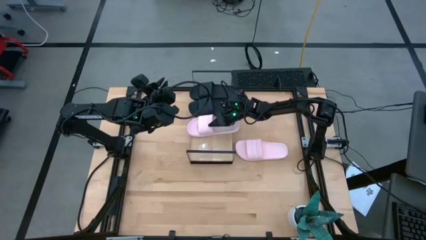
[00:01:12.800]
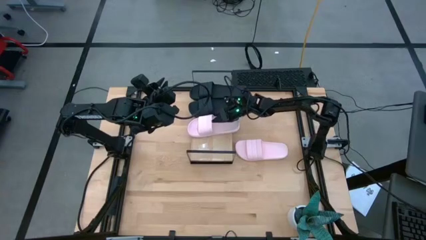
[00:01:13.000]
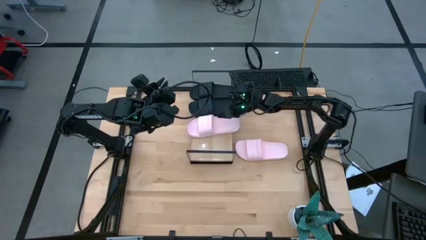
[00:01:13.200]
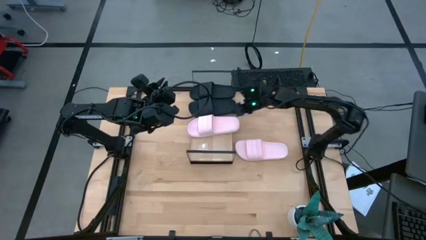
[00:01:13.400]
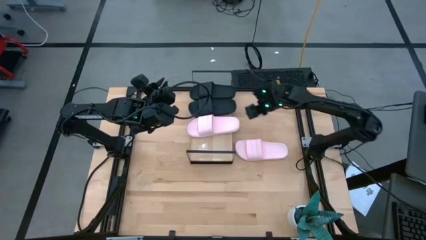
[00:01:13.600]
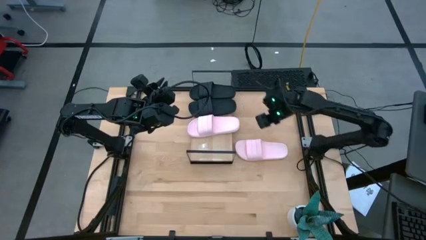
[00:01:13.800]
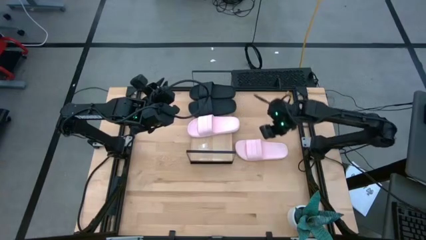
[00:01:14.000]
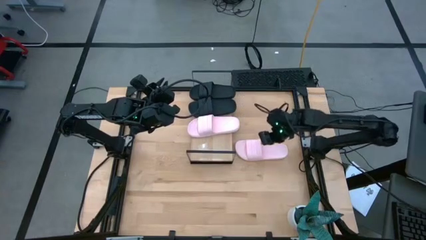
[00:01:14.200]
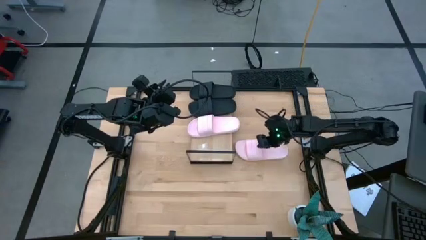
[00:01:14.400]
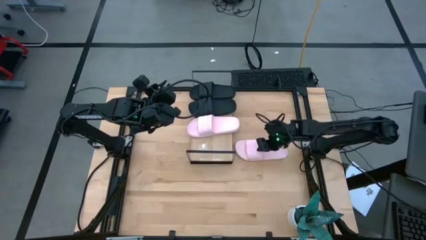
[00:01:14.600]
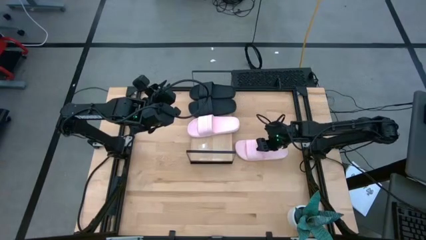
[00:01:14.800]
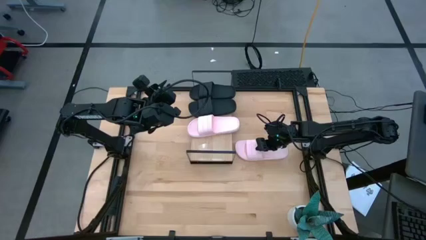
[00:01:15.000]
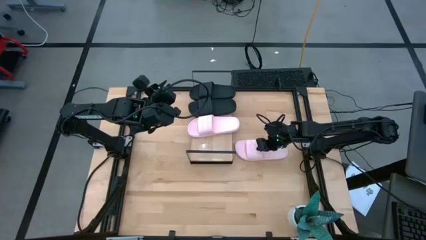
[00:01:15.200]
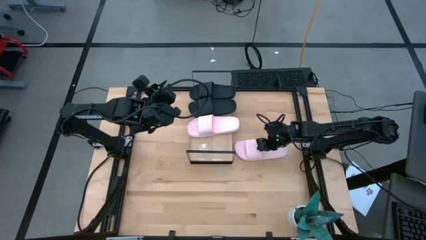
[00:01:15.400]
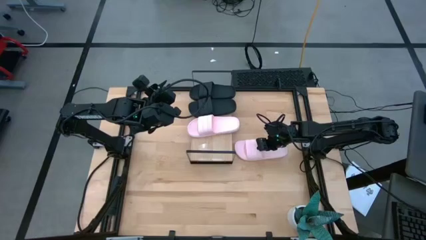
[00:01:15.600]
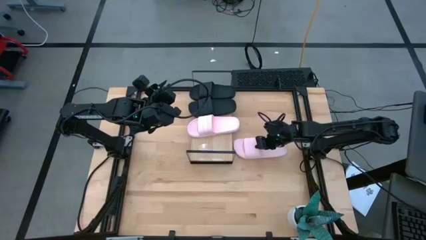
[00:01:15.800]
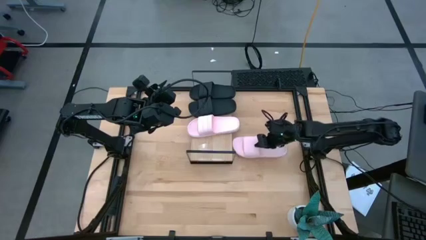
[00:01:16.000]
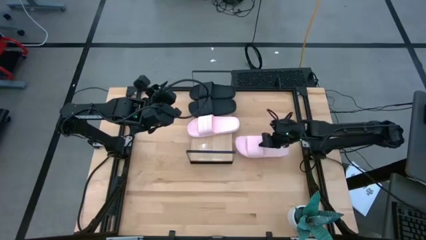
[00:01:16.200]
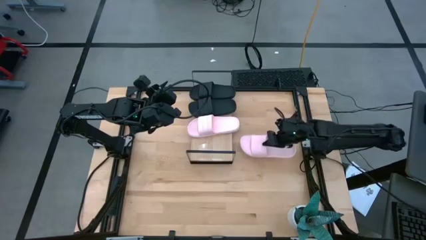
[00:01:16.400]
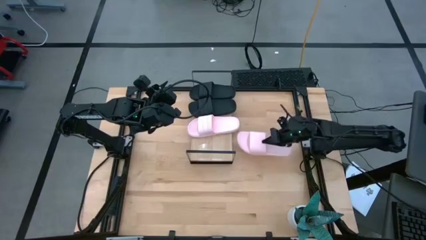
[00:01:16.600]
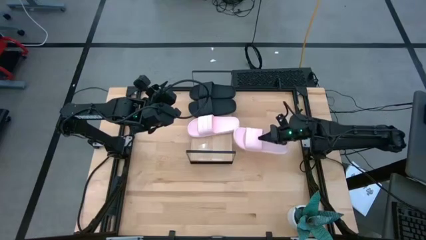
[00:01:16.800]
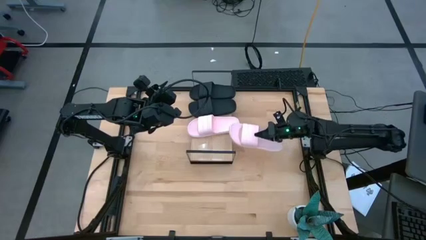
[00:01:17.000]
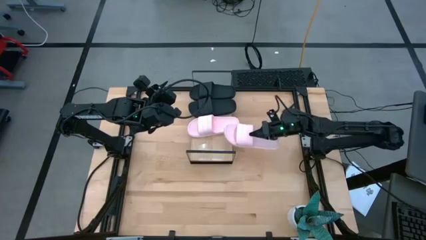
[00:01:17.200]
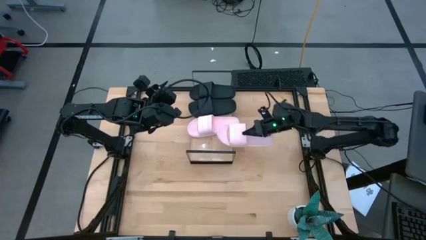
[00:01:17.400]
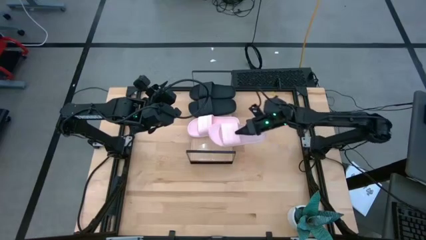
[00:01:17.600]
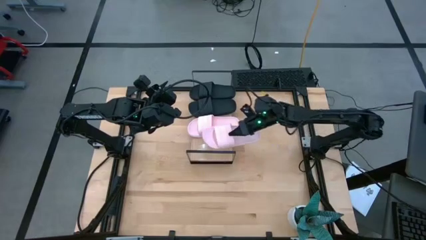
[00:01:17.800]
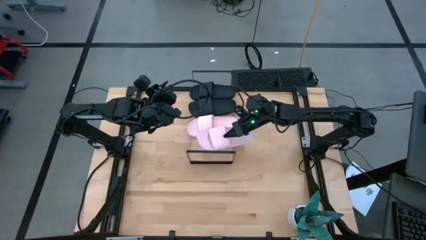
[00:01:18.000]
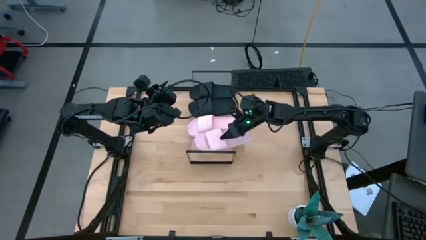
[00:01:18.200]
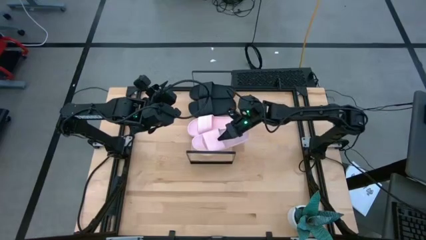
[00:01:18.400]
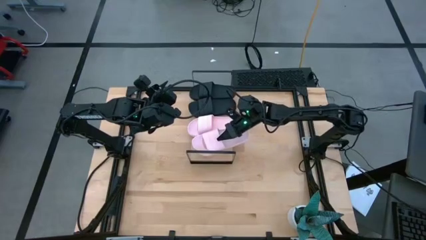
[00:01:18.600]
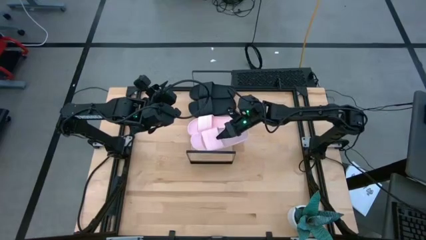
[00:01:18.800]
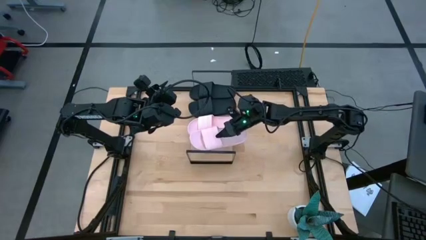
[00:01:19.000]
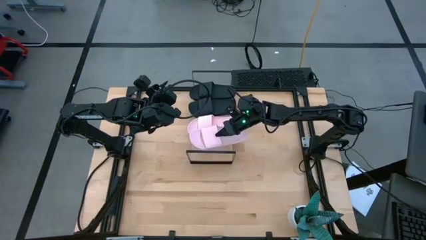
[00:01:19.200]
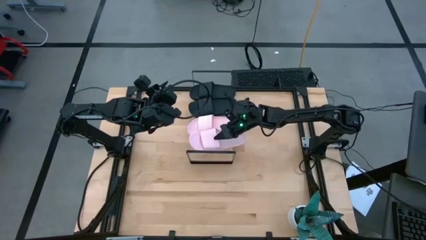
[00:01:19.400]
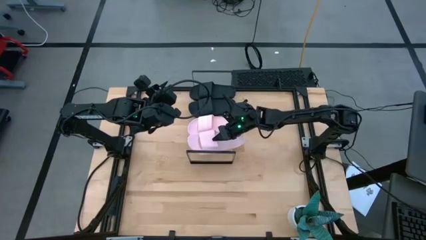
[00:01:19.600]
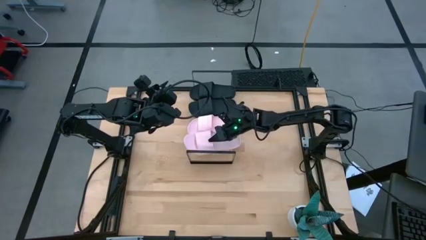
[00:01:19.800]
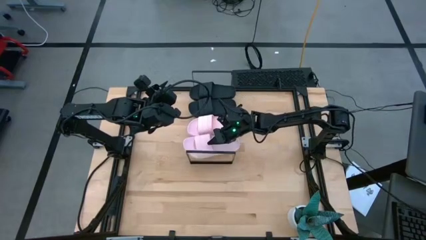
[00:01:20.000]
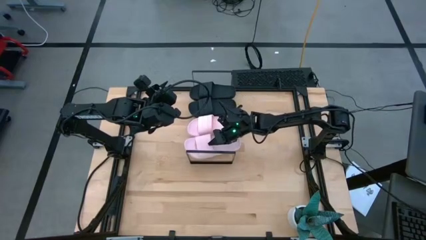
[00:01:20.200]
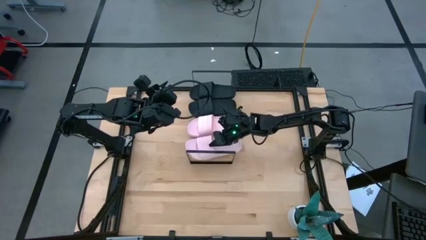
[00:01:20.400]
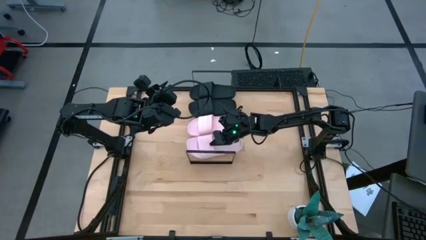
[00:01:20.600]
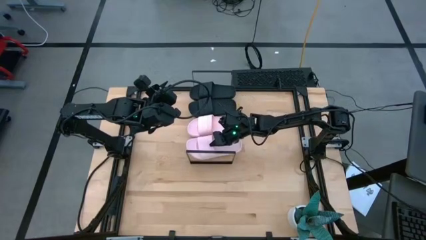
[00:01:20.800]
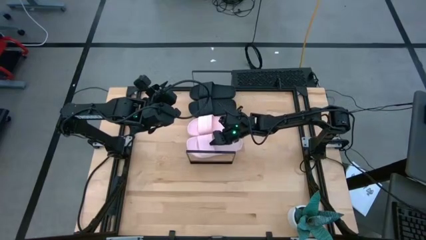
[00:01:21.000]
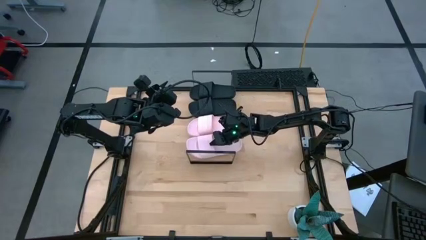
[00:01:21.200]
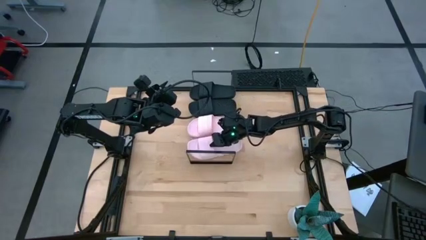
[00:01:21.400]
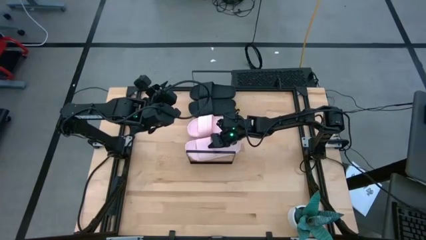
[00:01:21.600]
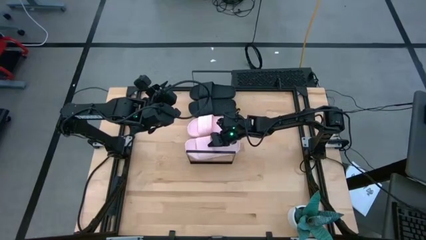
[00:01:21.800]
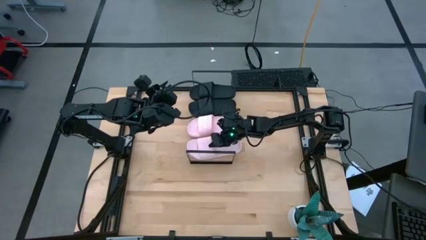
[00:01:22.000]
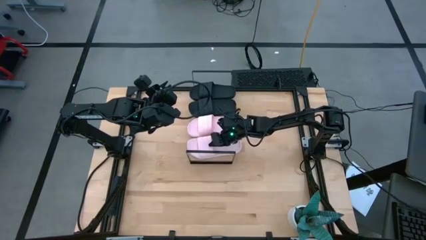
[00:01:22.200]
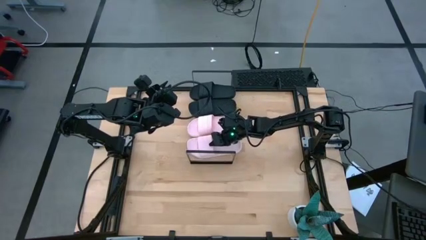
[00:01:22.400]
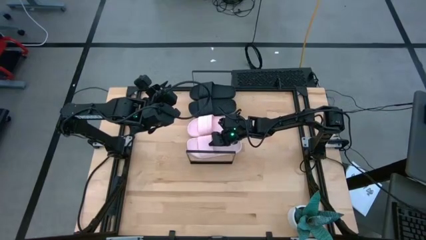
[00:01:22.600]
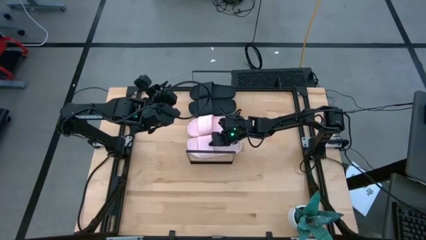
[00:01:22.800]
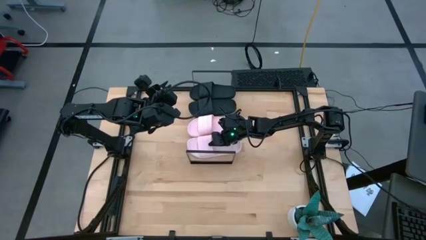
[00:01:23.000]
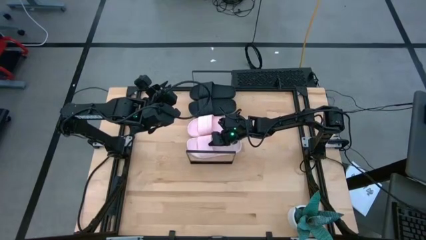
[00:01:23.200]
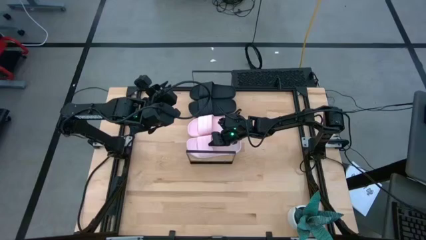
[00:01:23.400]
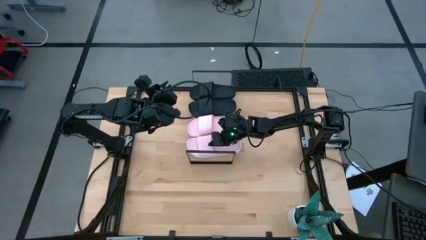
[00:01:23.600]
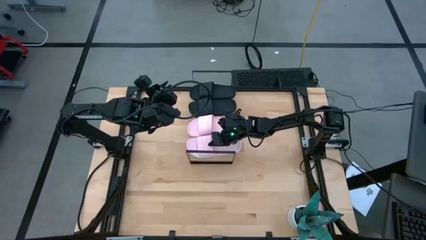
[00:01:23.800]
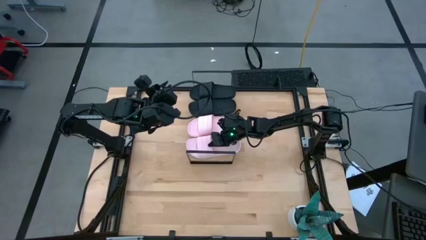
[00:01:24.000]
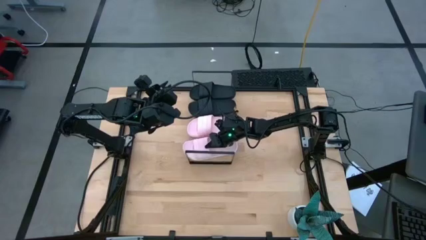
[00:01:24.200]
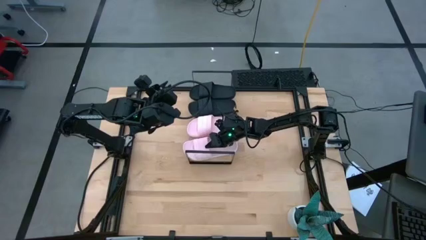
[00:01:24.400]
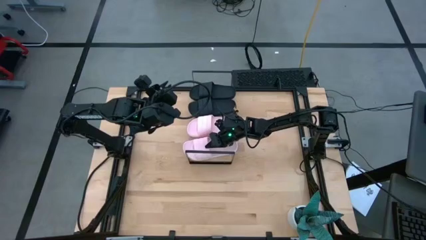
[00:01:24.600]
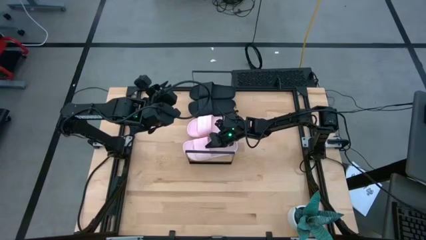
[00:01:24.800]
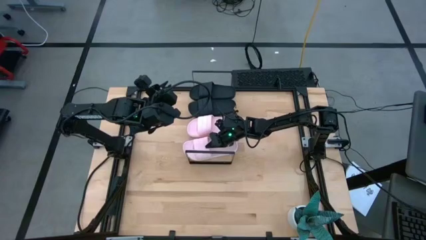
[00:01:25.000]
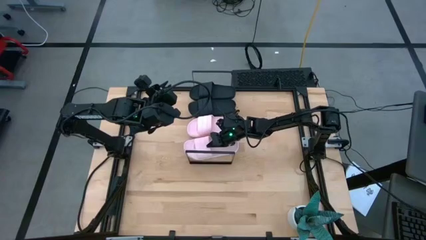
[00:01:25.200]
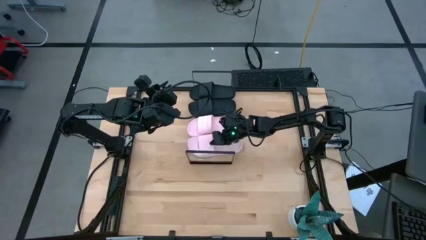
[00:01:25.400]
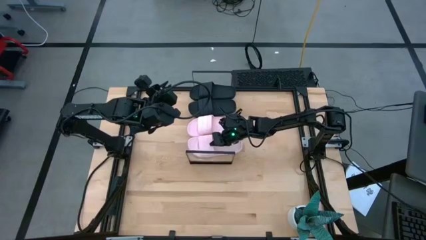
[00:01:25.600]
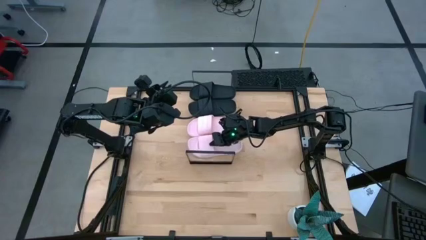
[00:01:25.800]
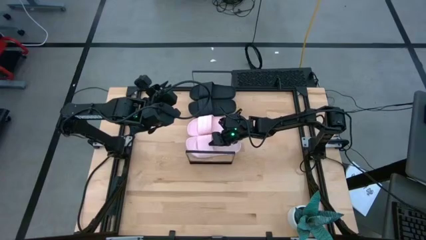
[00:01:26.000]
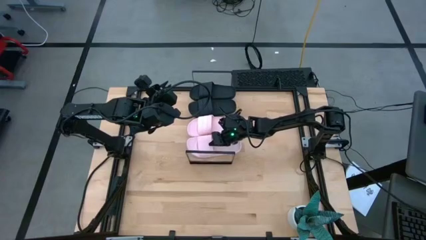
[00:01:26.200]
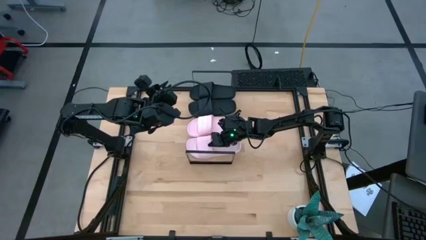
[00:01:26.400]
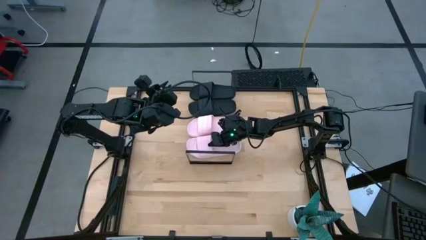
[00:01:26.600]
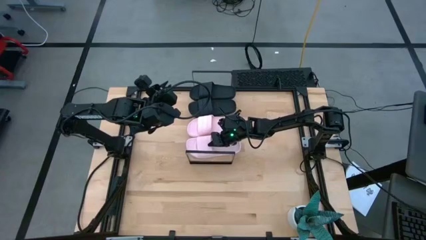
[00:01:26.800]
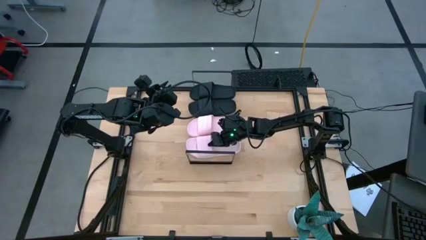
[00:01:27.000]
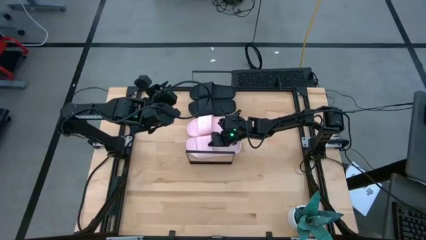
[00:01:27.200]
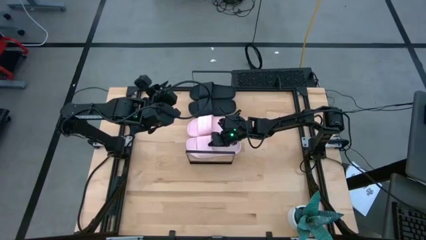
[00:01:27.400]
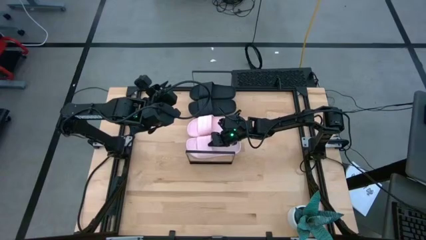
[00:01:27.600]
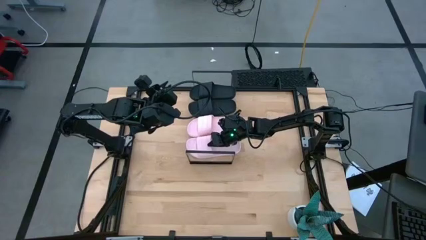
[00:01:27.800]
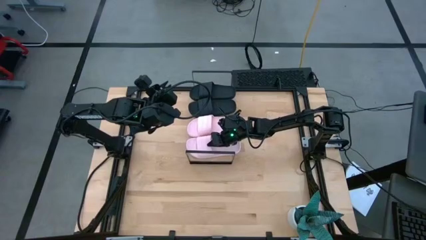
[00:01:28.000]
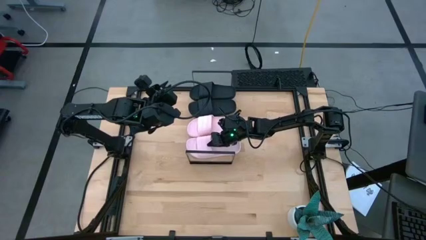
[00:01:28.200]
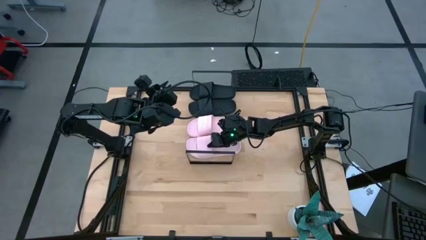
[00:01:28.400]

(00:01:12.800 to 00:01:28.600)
Task: Pick and place slides into the shelf
Put the pink slide on the shelf
